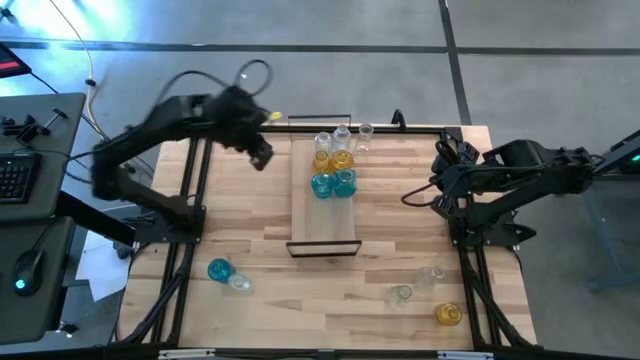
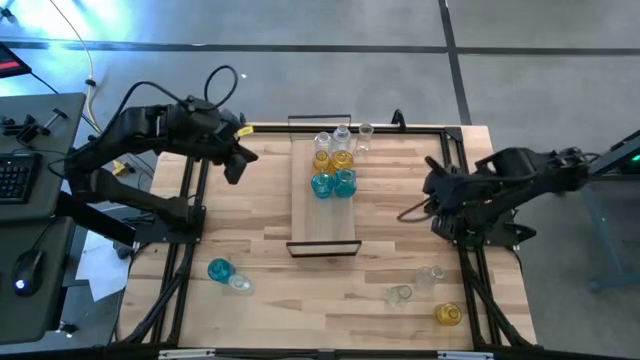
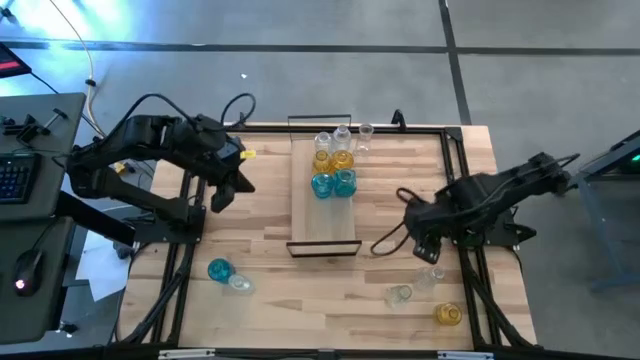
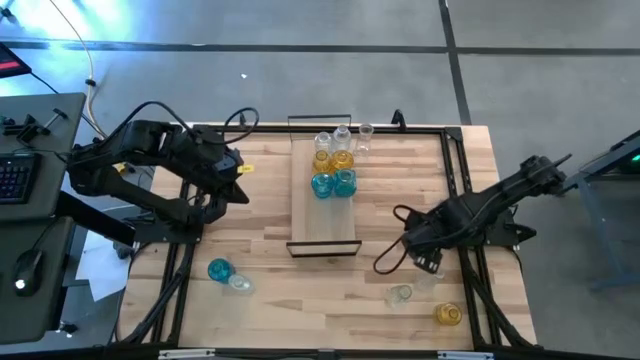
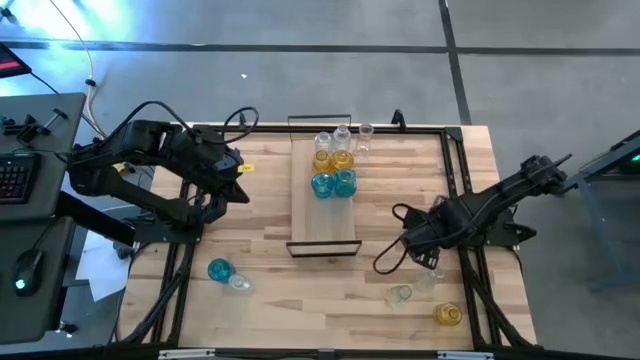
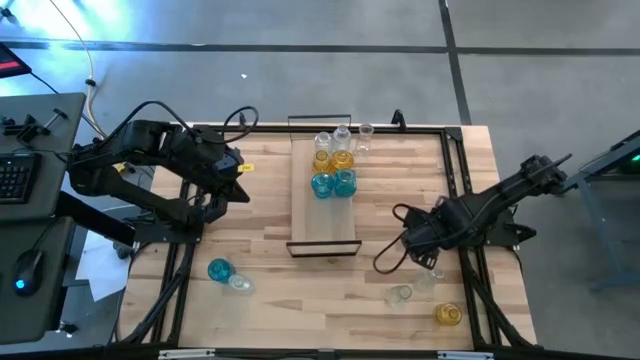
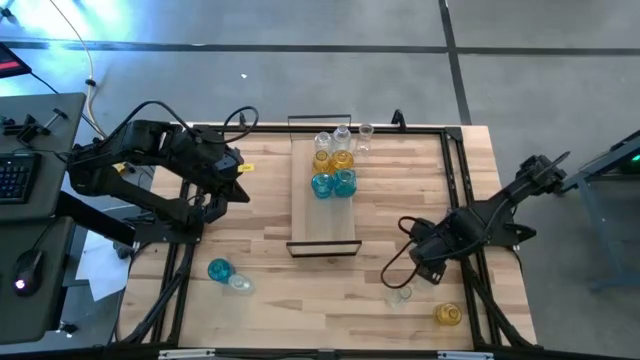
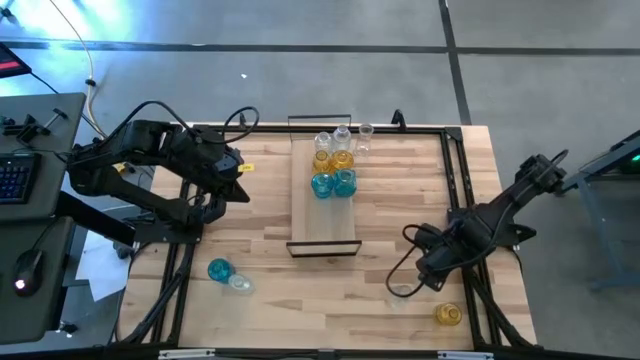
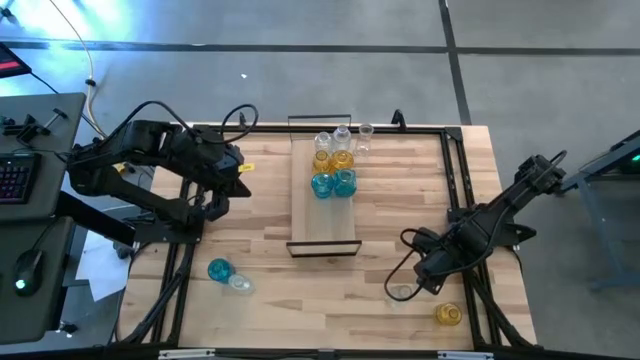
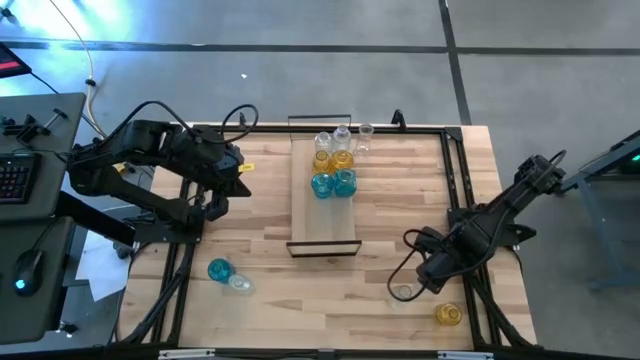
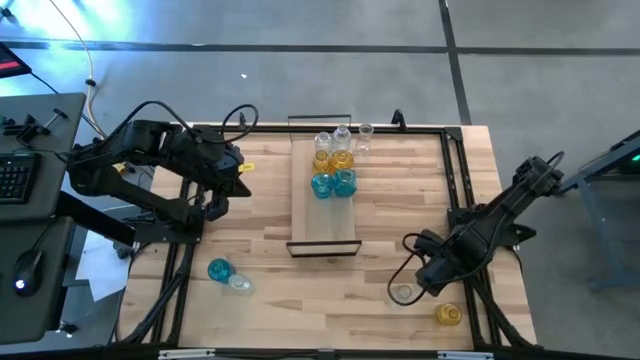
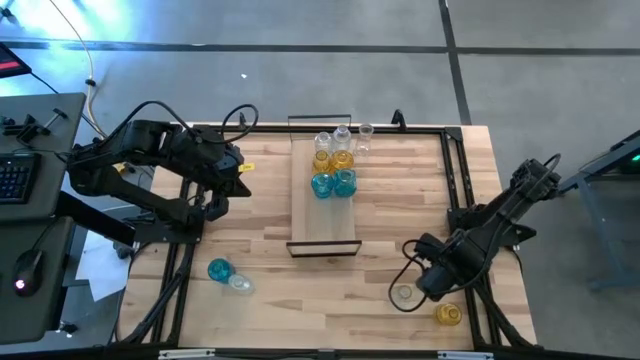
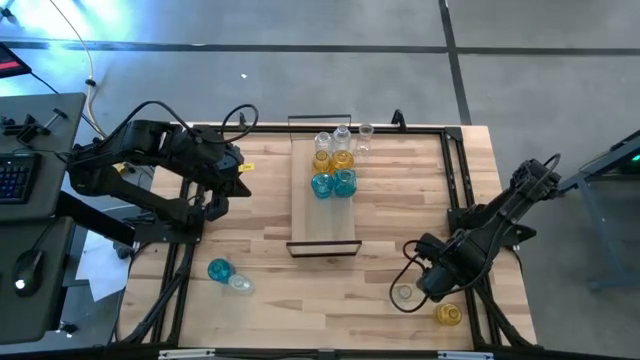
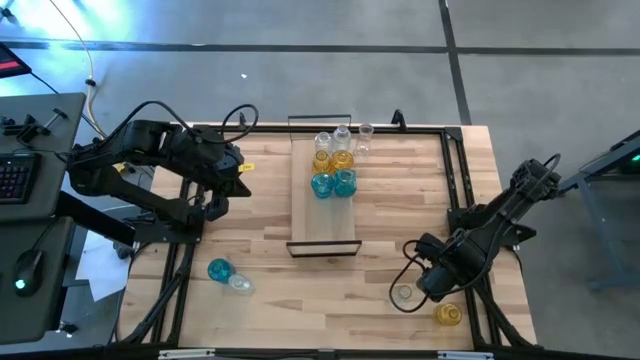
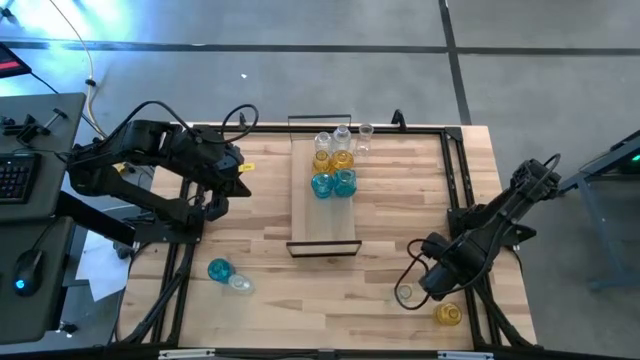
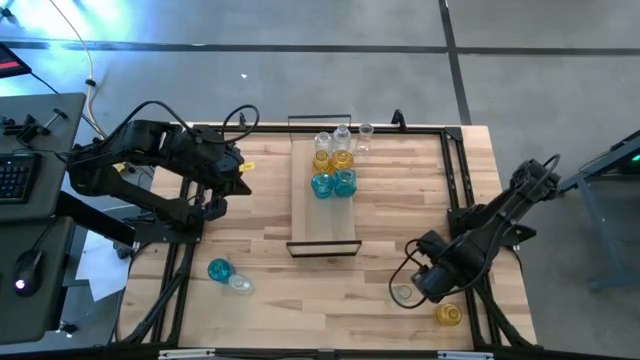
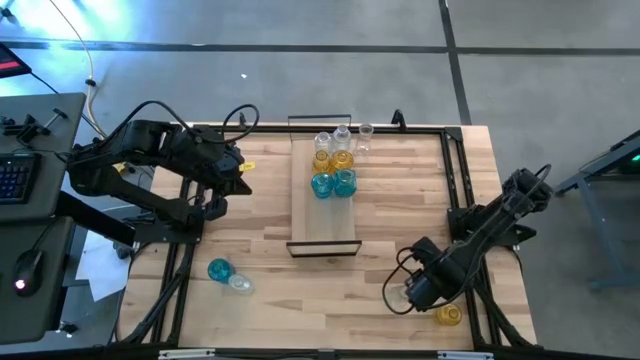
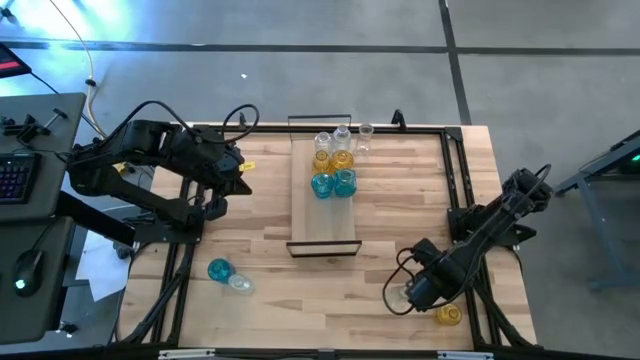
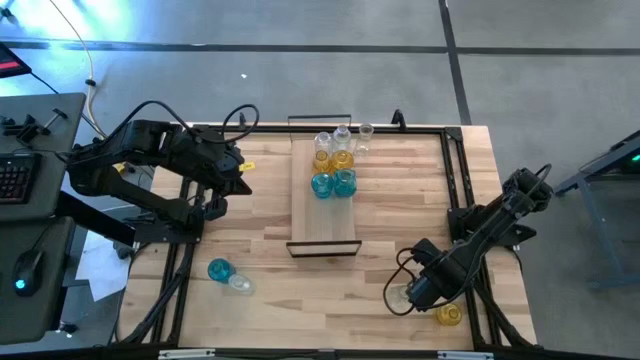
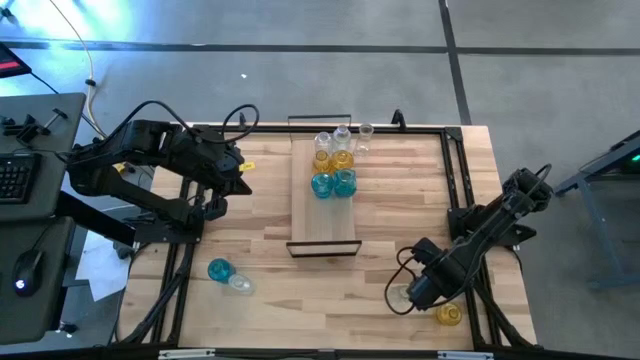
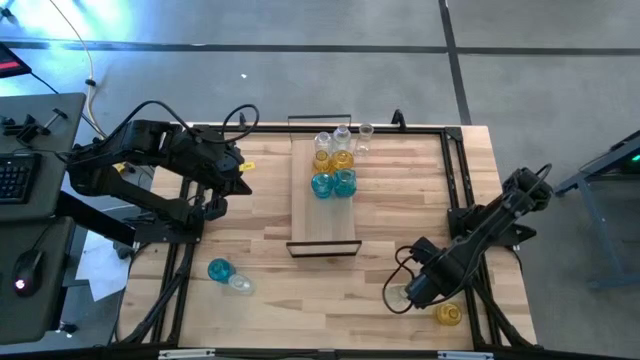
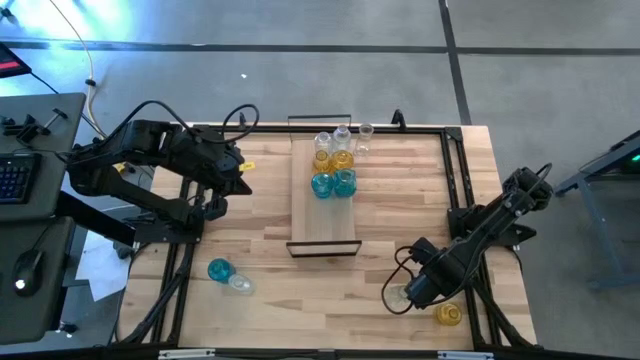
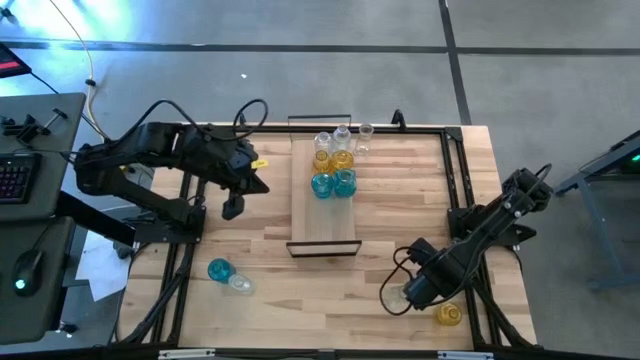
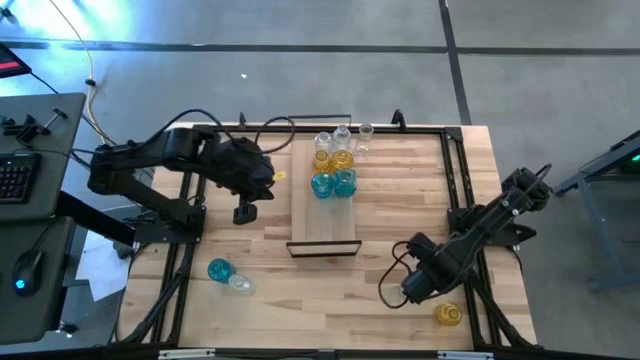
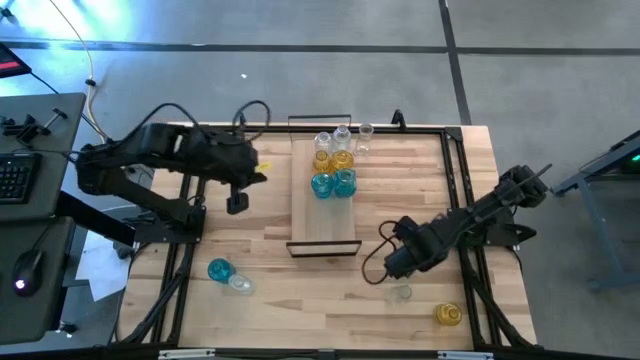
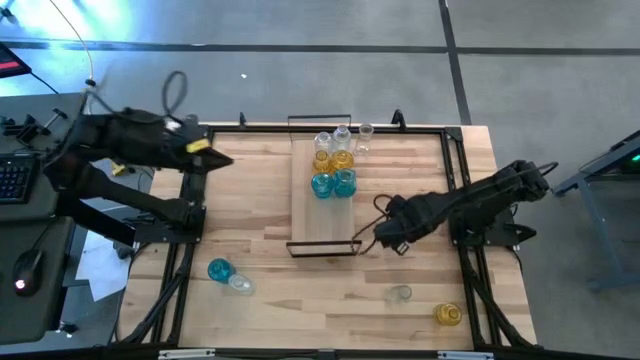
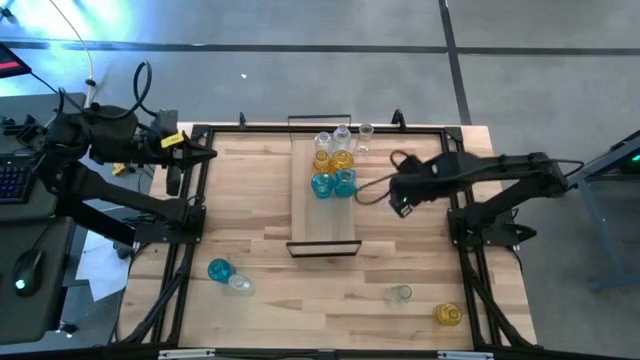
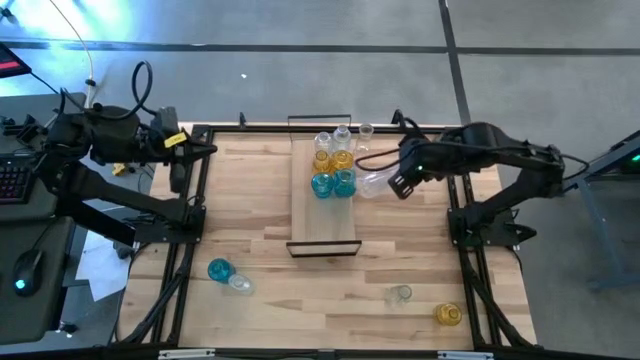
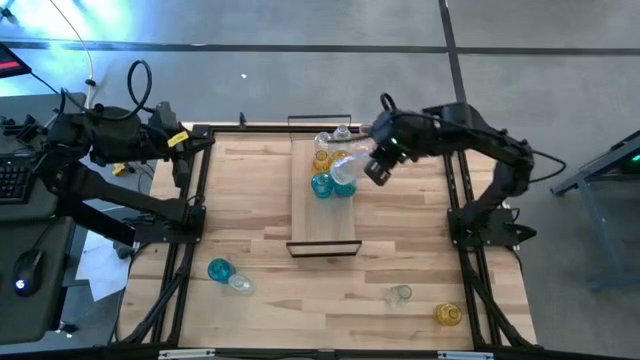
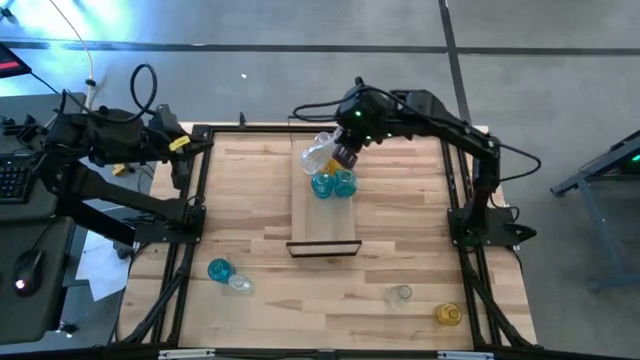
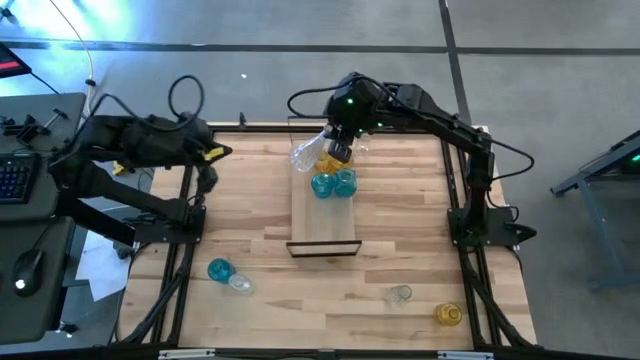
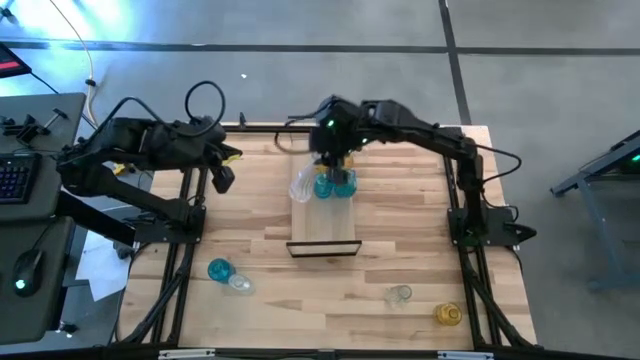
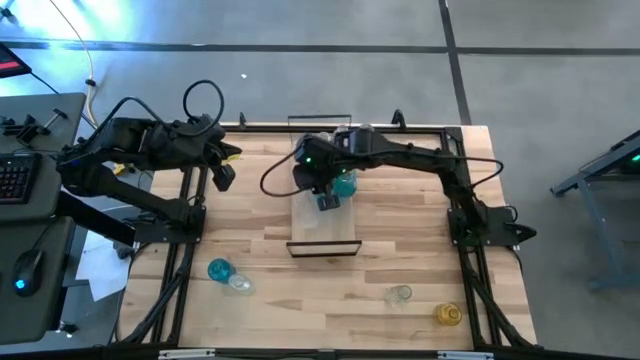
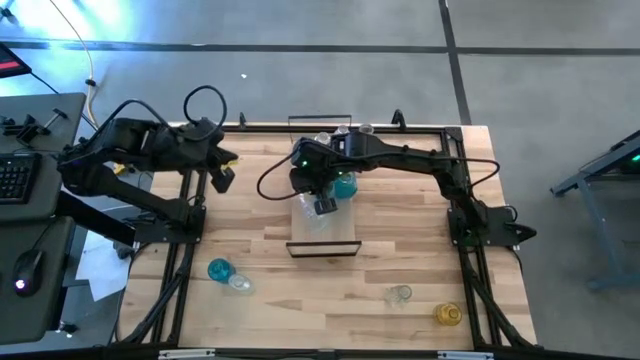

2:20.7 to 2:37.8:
Task: sort vases onto shelf
Put the bottom right transparent flower vase on the shelf aligned with the other transparent flower vase

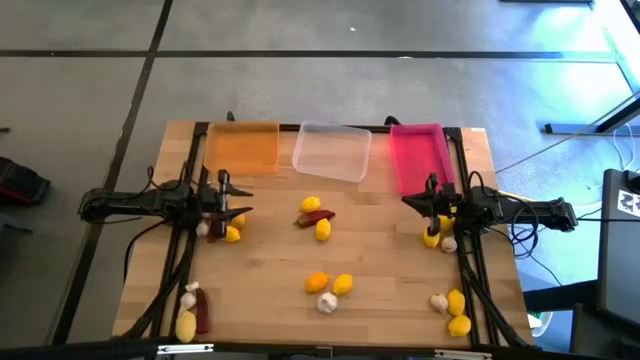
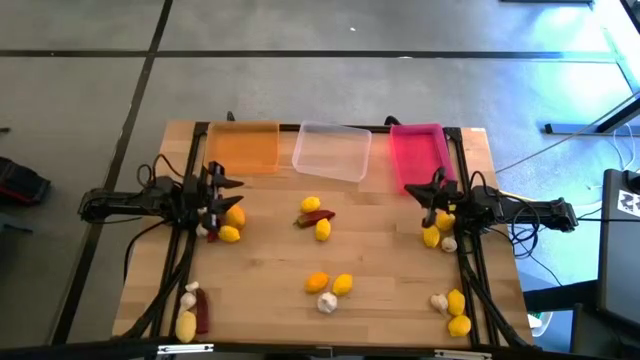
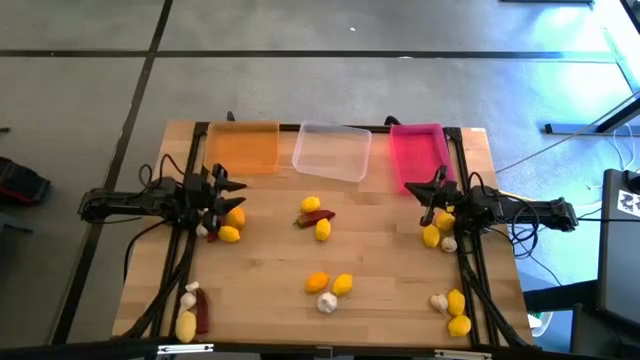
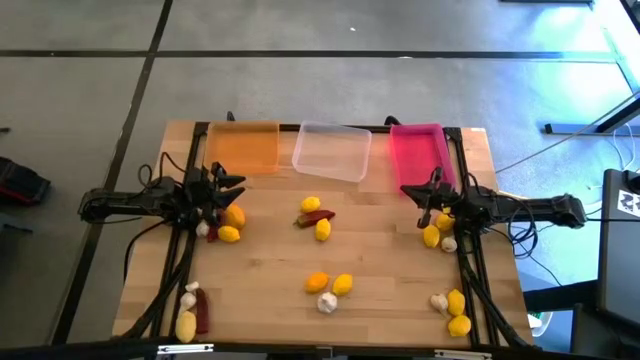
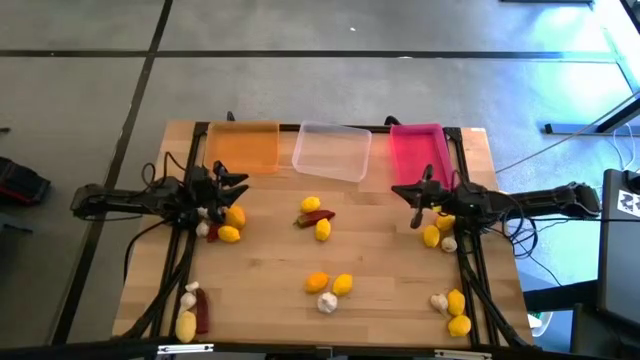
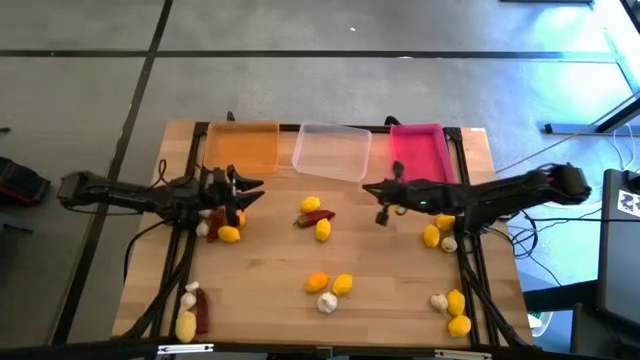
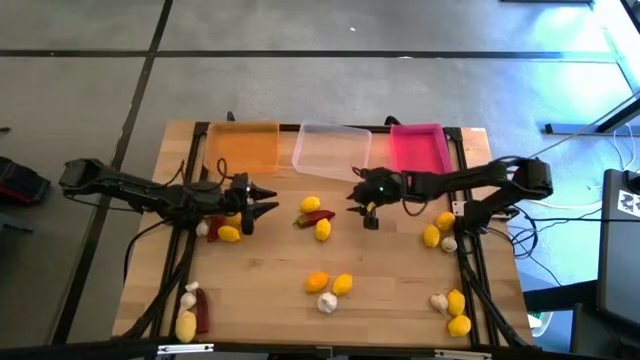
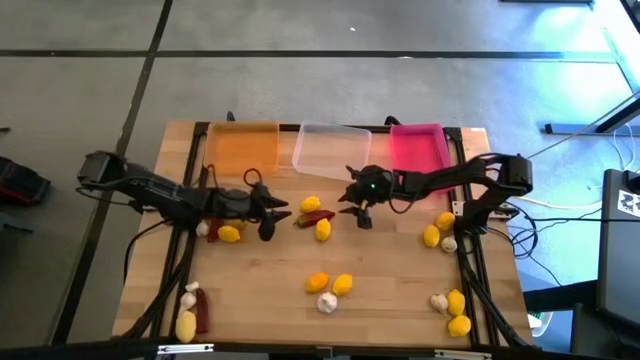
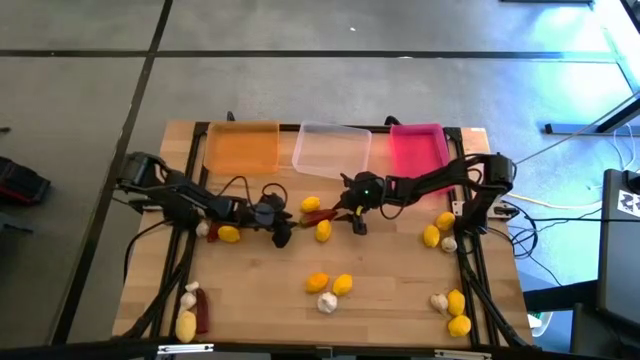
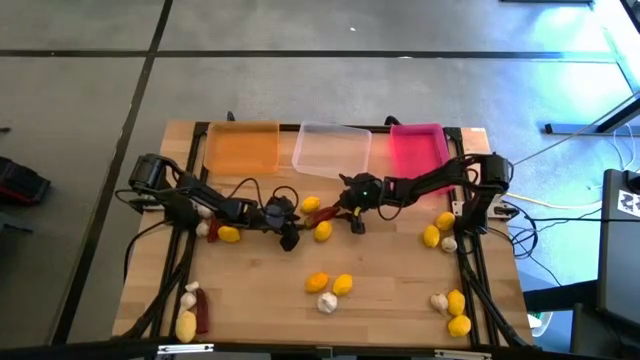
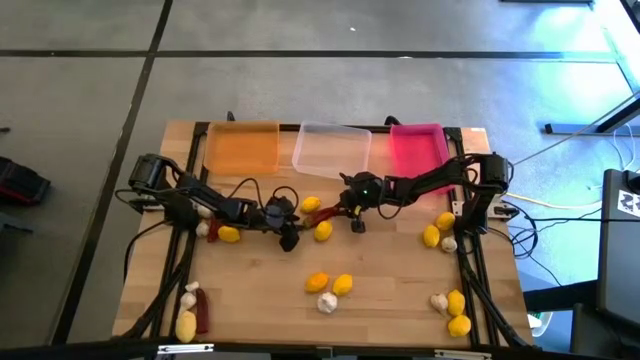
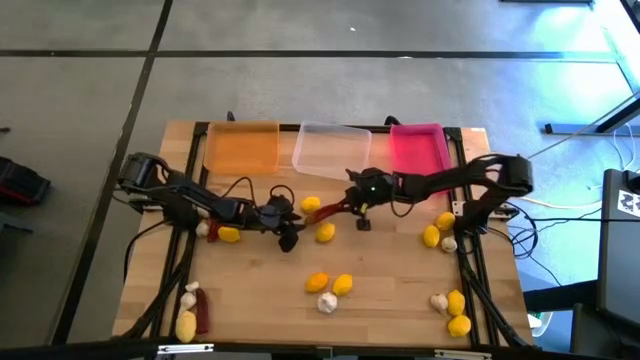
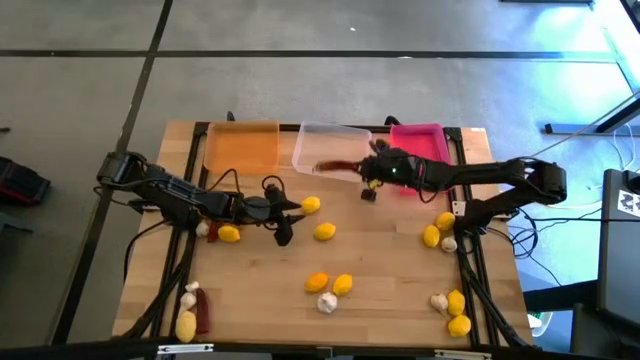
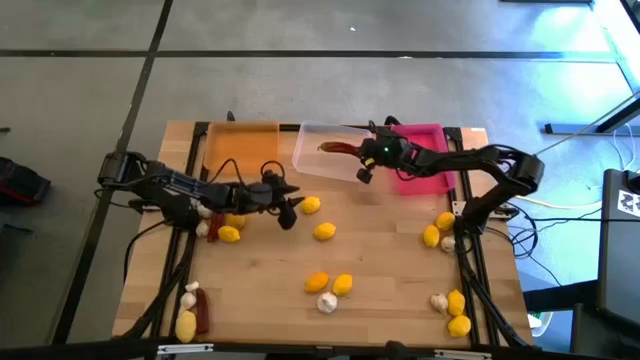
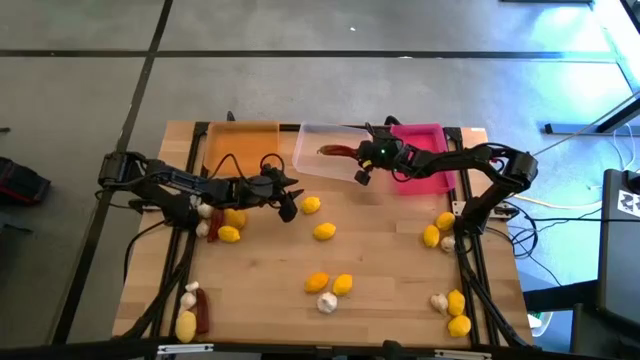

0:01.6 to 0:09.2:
Task: Sort produce into baskets
Put the red chili pepper into the transparent bin
